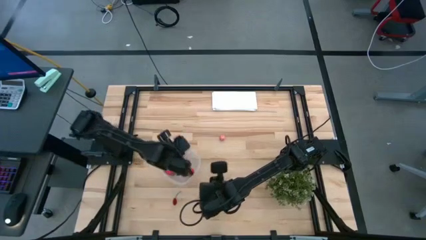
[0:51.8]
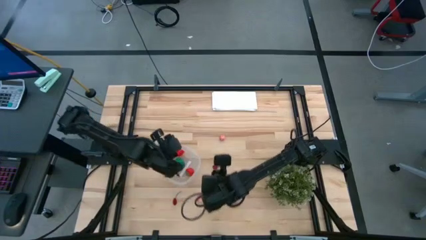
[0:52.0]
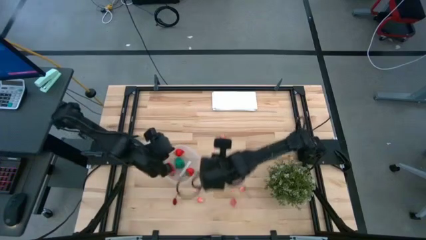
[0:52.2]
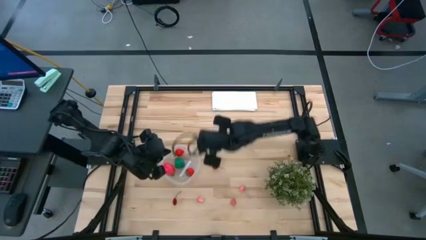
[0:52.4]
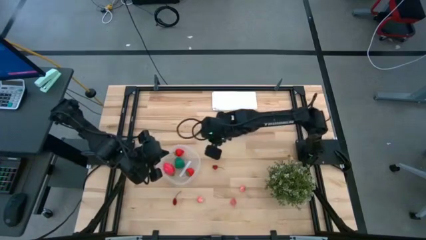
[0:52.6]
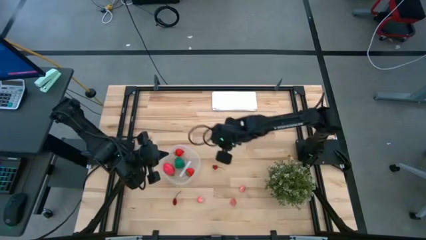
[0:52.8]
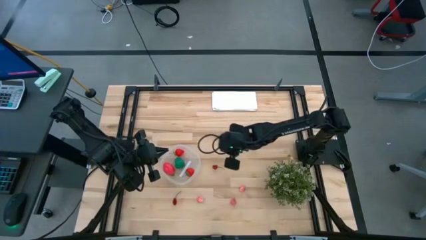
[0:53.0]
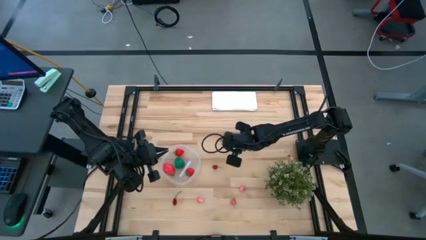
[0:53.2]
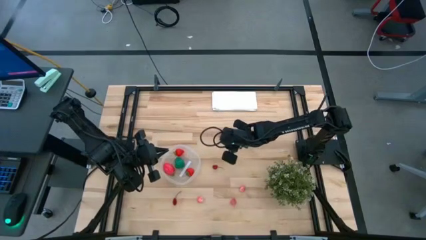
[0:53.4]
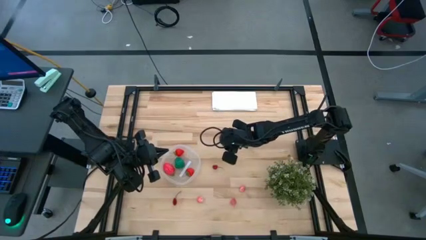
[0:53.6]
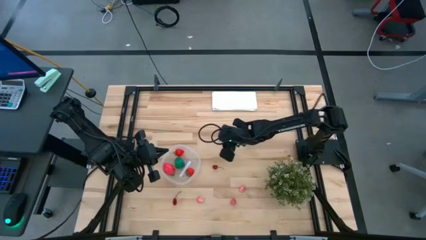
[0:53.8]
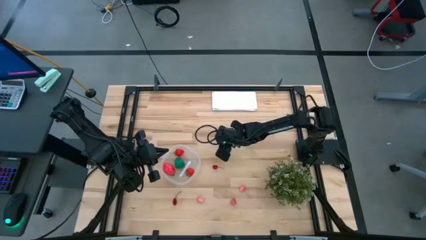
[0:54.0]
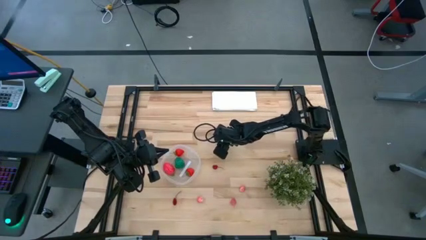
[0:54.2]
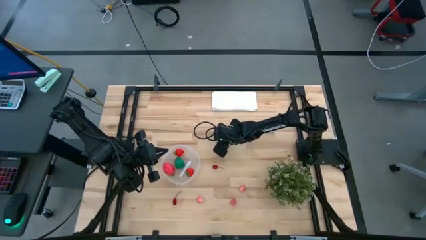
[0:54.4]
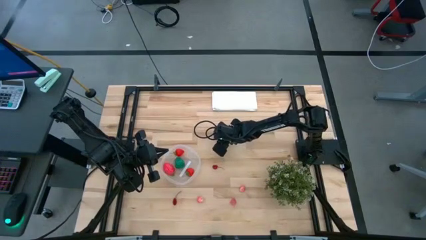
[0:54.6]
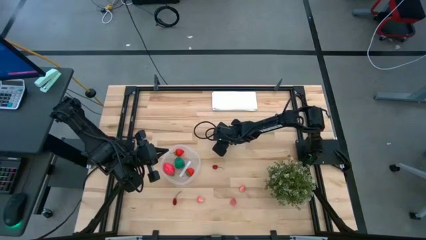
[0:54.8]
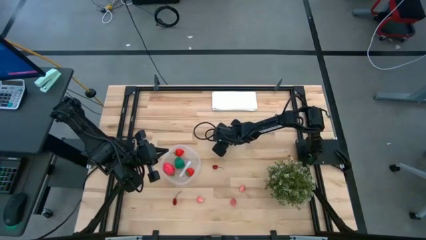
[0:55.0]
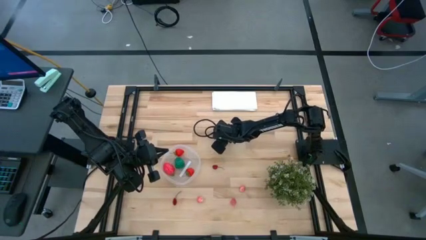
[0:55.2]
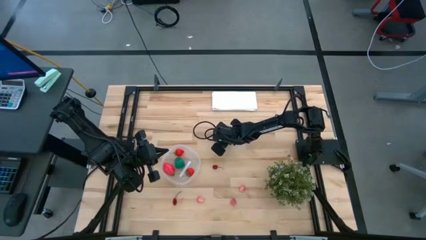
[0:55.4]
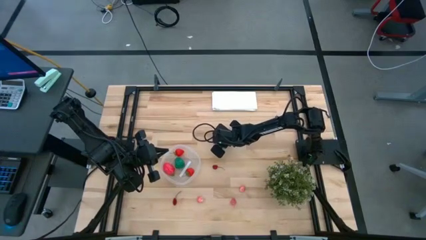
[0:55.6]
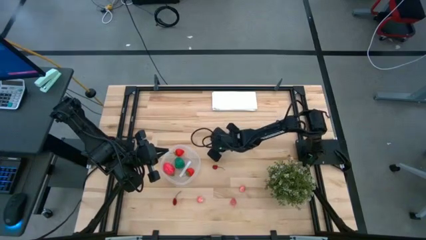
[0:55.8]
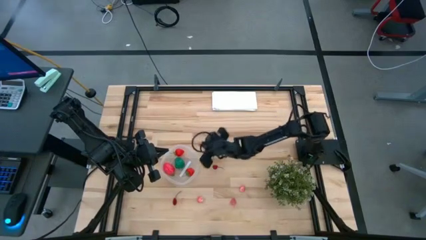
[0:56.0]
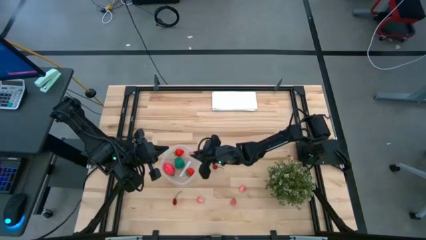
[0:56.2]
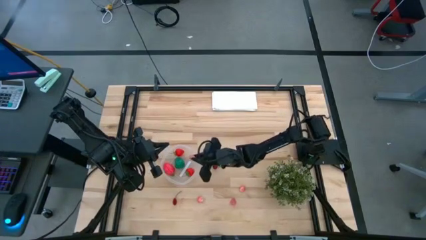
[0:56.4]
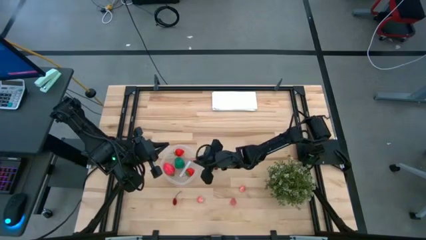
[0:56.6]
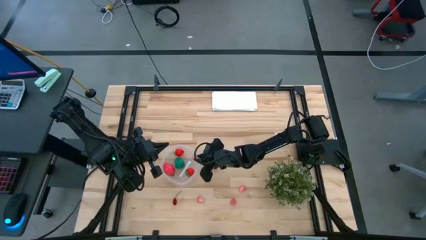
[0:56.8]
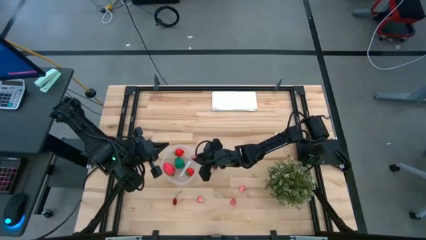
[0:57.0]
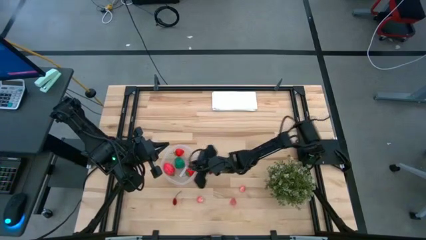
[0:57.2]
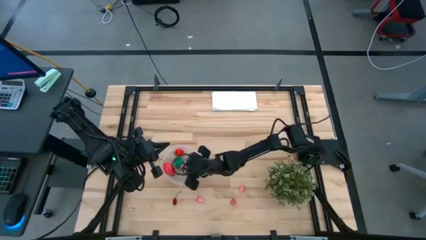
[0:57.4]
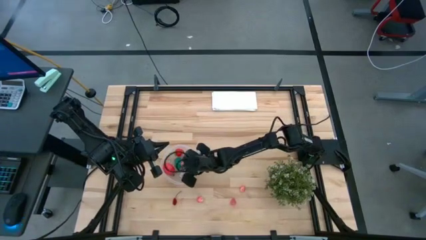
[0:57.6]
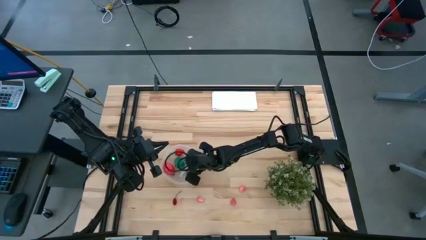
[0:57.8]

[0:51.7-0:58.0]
Task: Pick and placing Produce into tupperware
Put the peach into the transparent plastic container

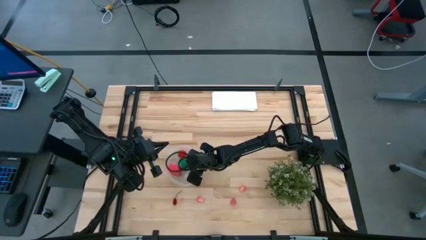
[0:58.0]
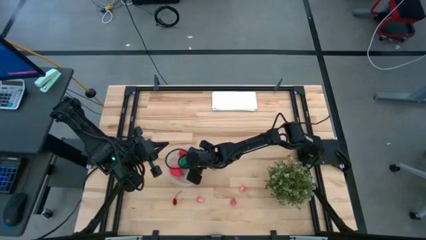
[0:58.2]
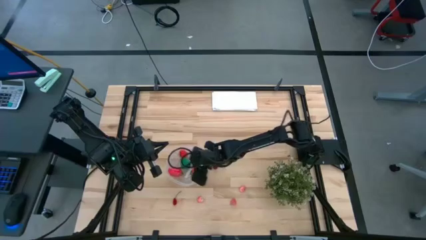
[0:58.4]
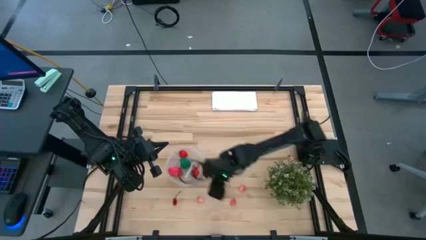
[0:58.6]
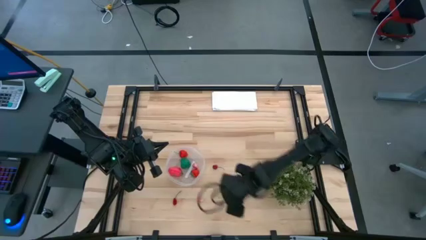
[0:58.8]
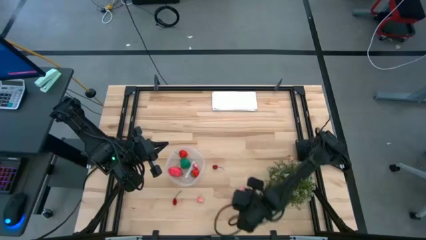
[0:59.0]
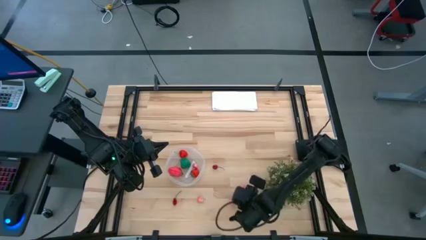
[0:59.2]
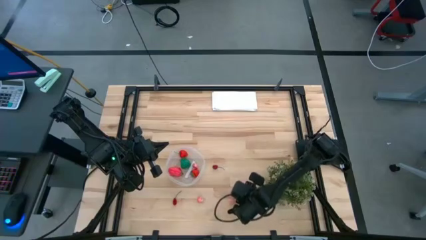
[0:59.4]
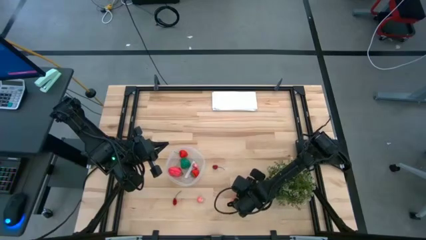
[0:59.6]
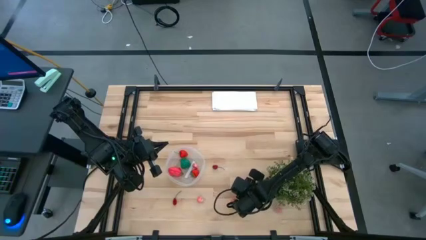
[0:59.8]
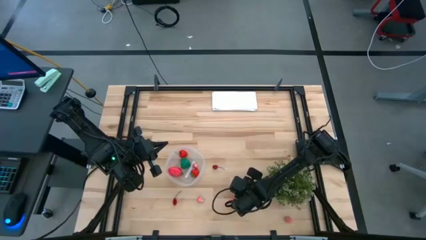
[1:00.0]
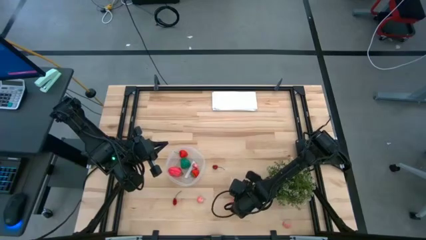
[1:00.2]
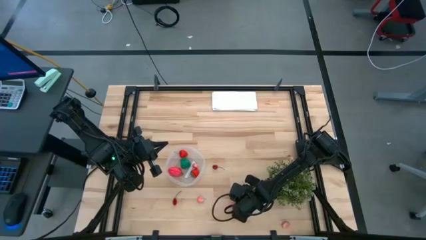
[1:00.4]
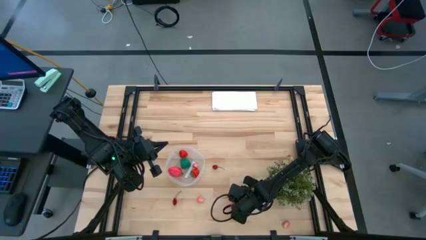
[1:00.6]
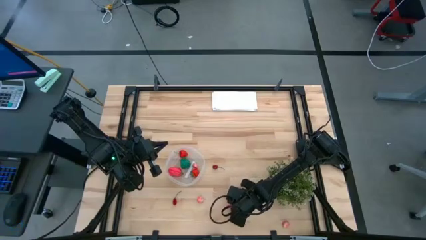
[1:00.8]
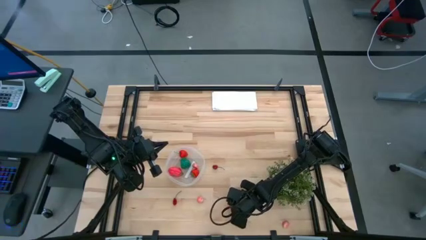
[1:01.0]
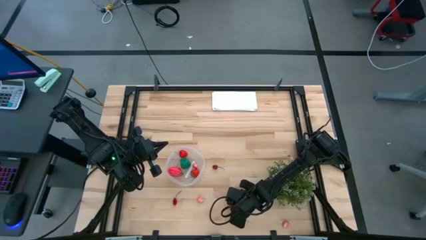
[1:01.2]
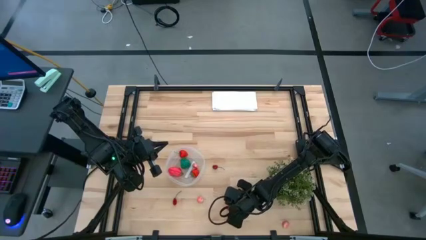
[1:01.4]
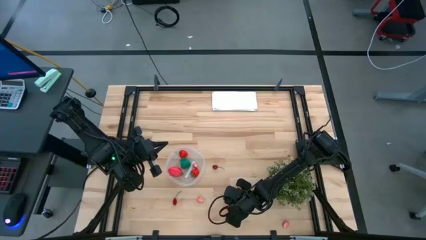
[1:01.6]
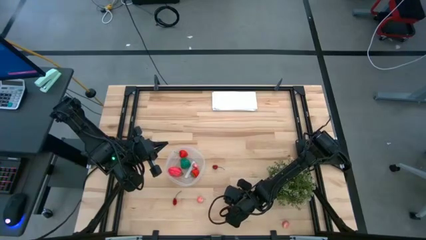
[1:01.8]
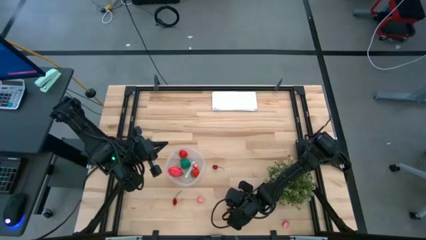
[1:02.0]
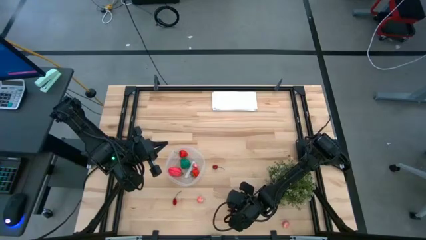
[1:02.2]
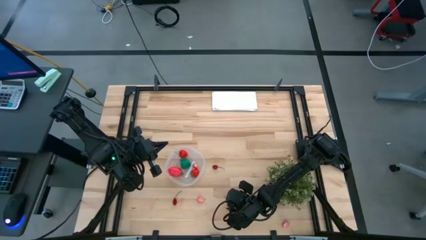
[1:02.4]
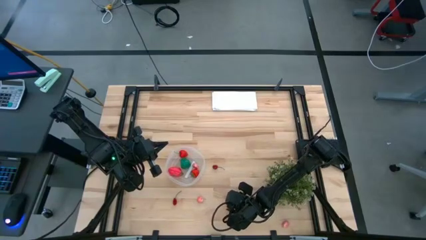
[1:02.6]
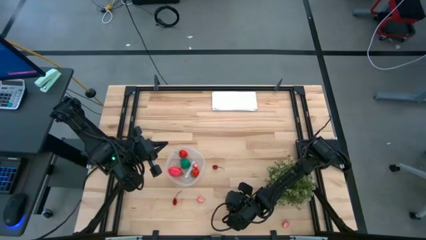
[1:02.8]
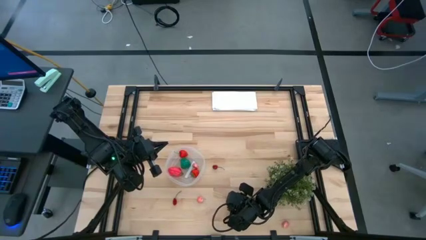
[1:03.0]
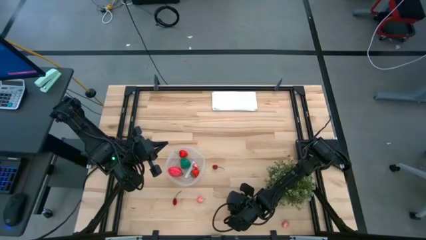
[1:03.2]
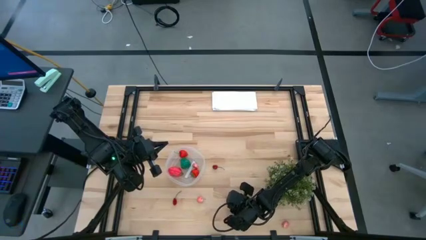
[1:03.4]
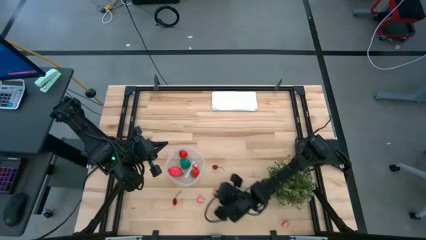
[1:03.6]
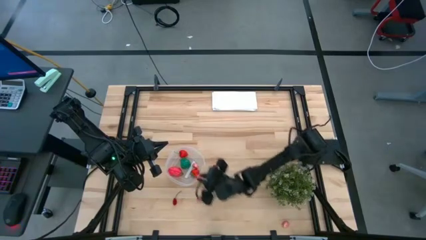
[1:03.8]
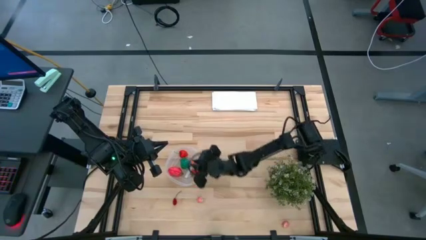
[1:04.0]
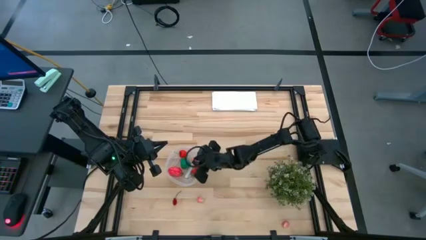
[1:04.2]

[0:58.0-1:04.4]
Put the peach into the transparent plastic container

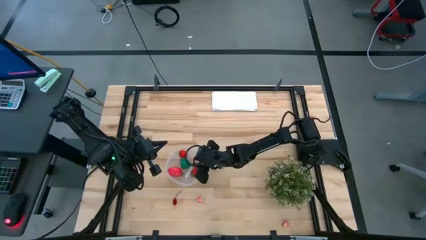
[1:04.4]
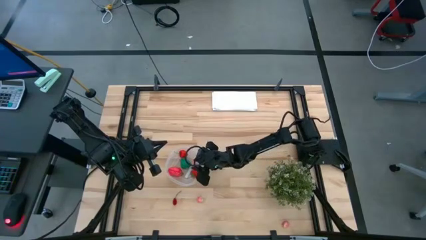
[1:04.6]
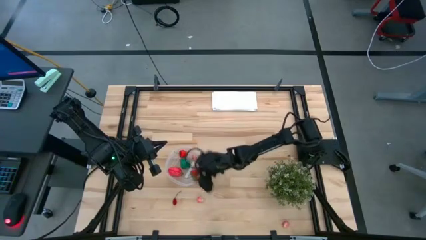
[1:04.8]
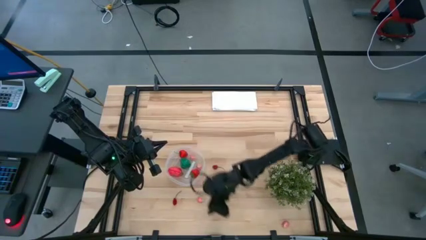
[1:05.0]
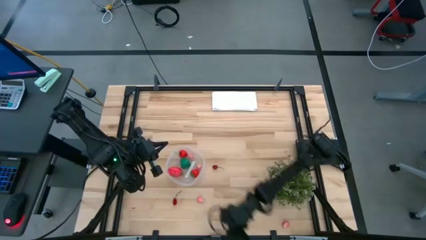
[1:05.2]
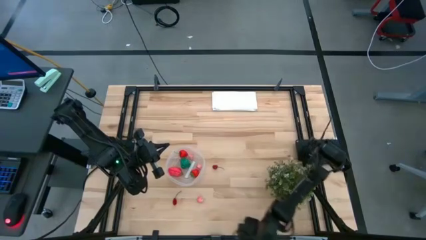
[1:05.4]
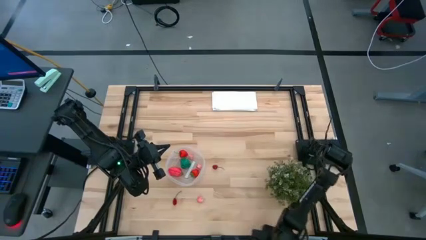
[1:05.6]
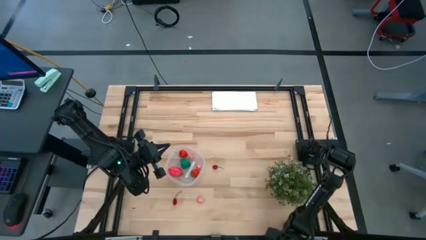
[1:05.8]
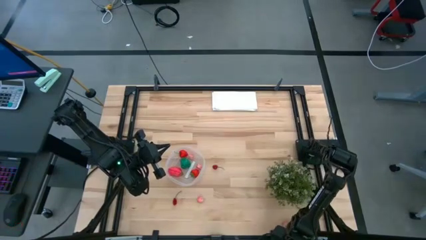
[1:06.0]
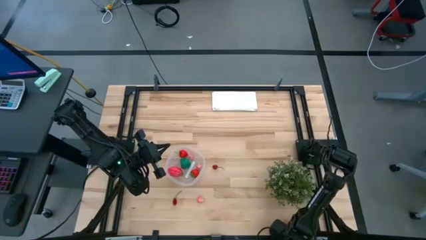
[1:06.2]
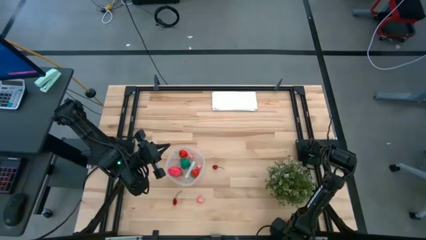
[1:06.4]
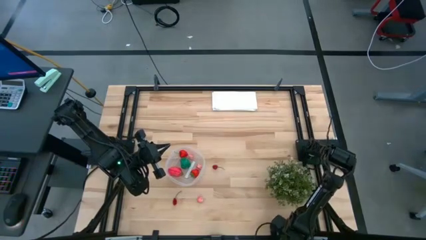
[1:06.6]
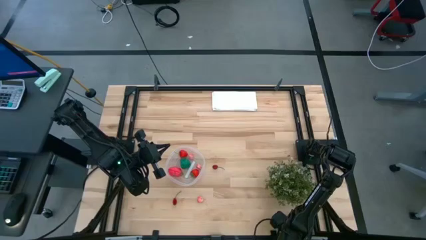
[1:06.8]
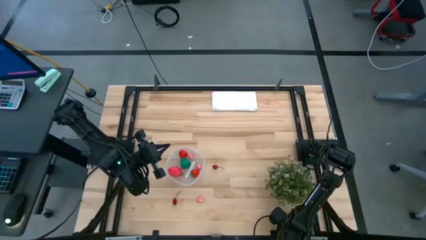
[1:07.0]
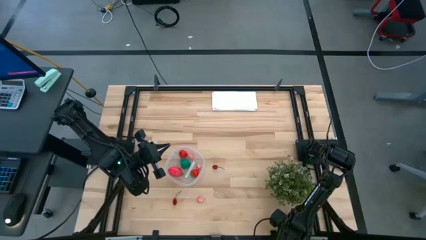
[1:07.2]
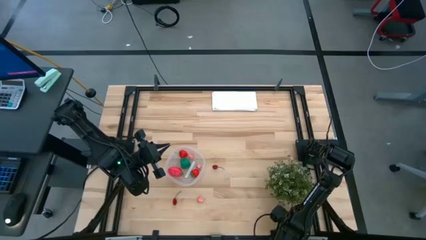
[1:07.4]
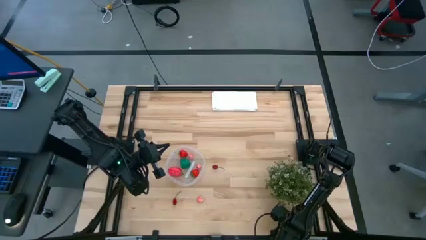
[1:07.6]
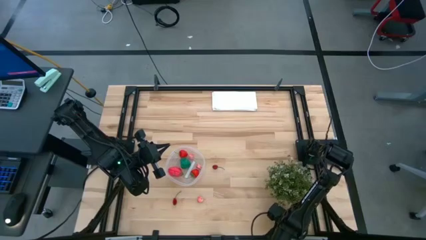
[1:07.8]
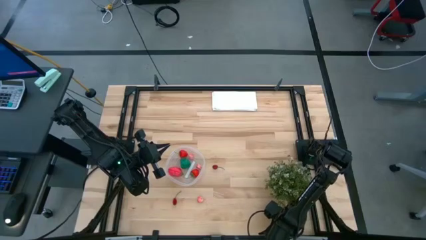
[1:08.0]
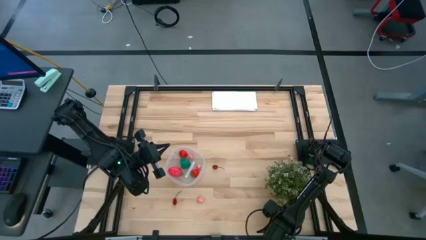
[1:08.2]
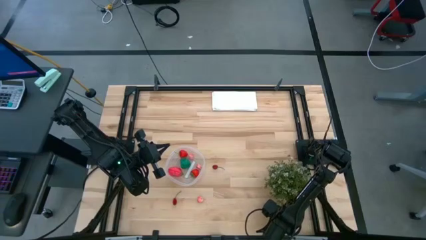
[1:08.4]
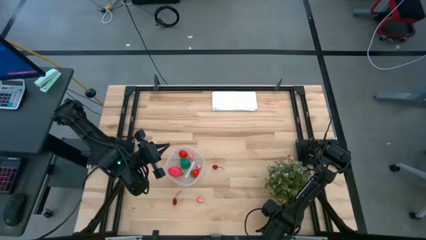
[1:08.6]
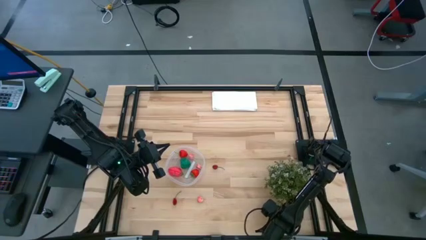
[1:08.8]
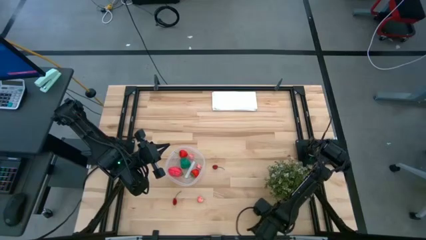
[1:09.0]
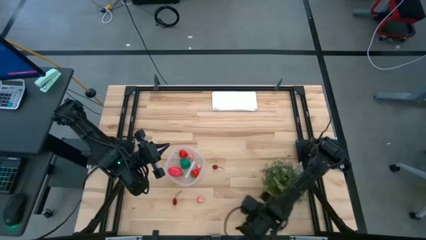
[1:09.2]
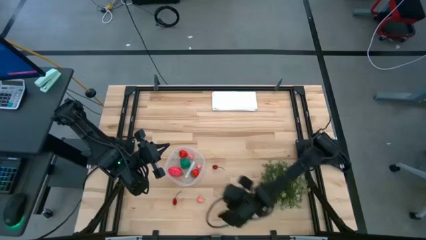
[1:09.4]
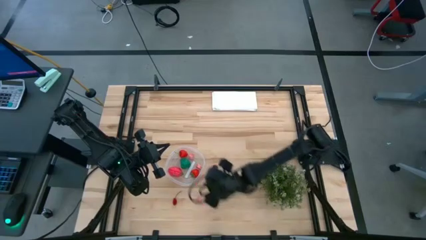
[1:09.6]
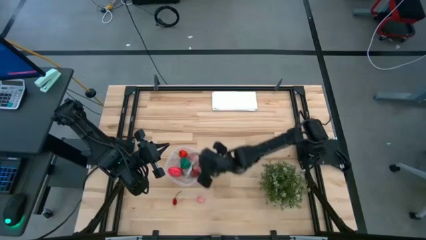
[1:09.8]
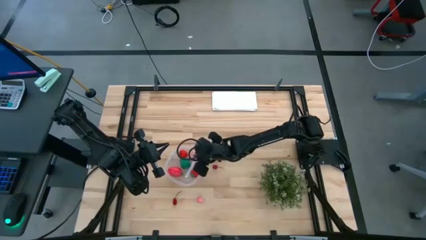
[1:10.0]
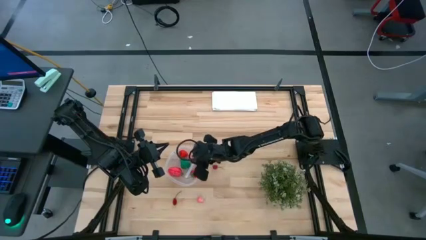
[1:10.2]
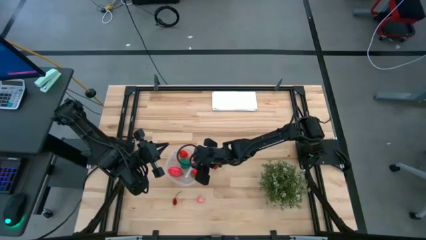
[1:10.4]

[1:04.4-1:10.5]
Put the peach into the transparent plastic container
